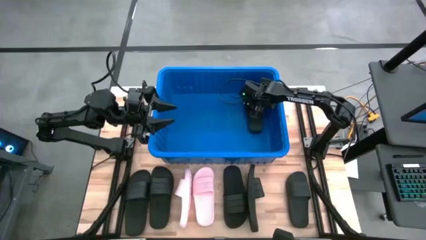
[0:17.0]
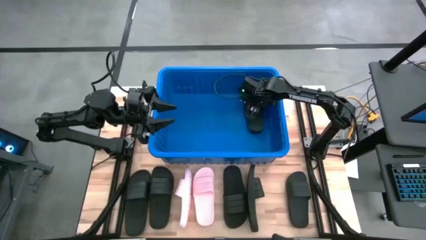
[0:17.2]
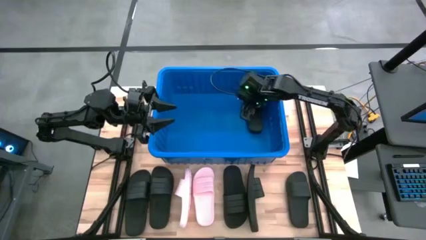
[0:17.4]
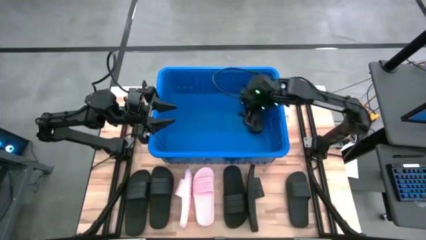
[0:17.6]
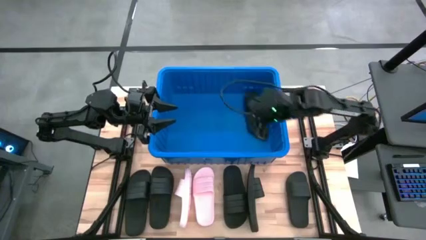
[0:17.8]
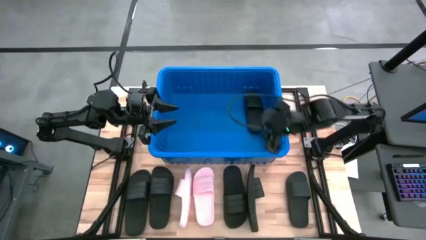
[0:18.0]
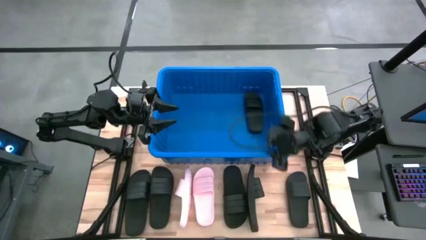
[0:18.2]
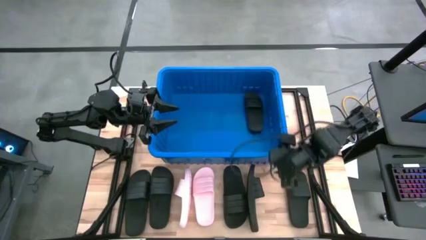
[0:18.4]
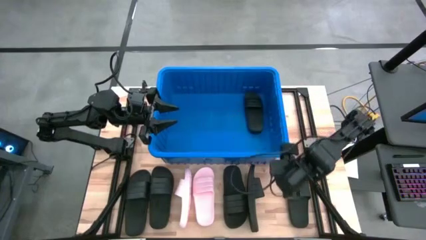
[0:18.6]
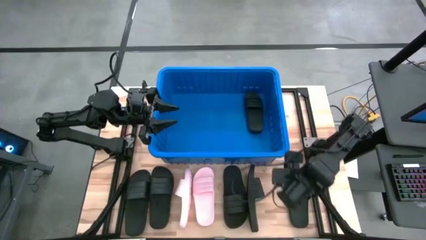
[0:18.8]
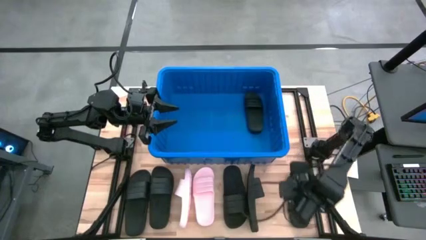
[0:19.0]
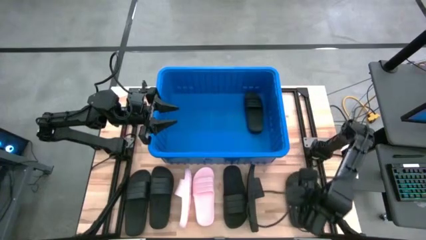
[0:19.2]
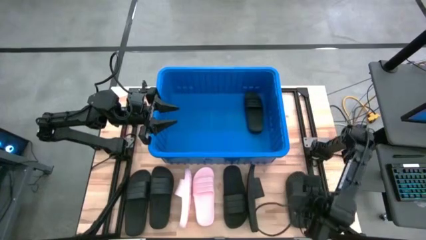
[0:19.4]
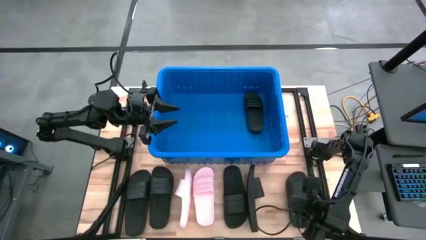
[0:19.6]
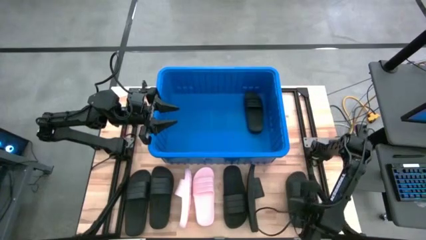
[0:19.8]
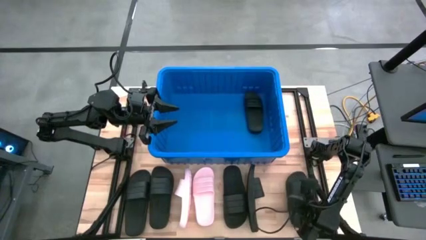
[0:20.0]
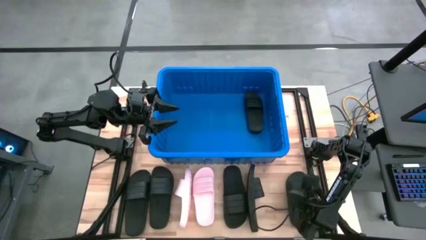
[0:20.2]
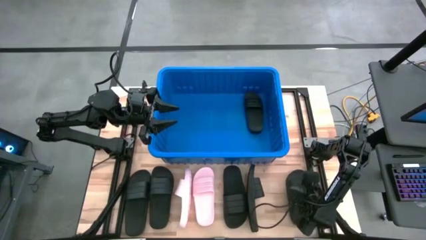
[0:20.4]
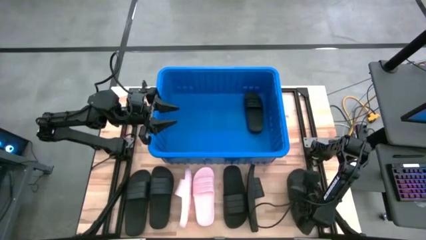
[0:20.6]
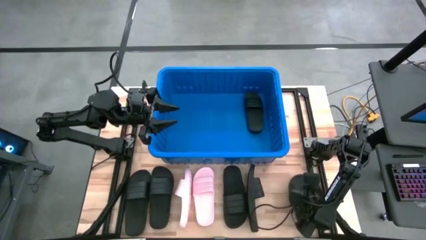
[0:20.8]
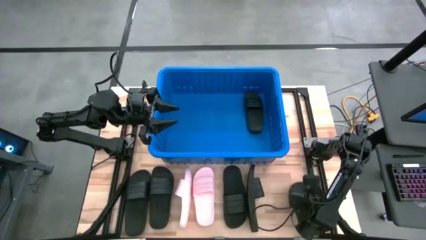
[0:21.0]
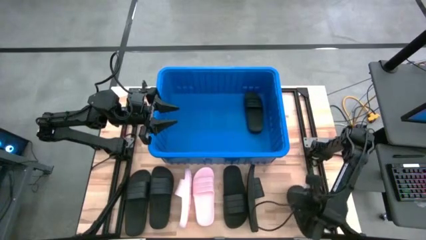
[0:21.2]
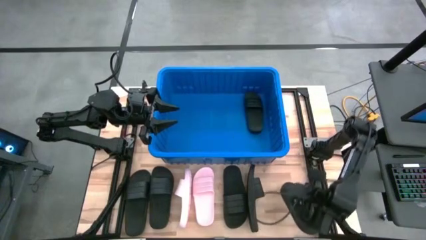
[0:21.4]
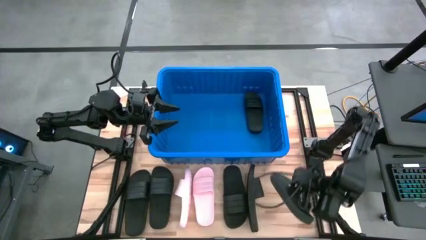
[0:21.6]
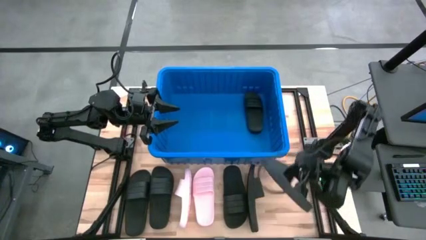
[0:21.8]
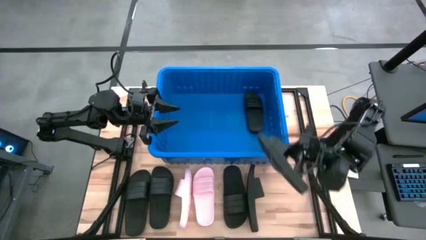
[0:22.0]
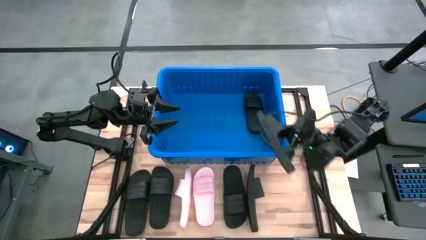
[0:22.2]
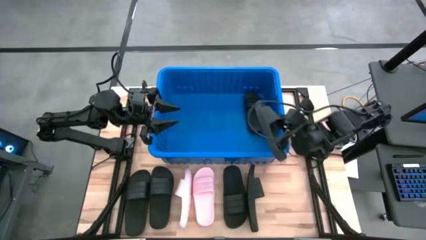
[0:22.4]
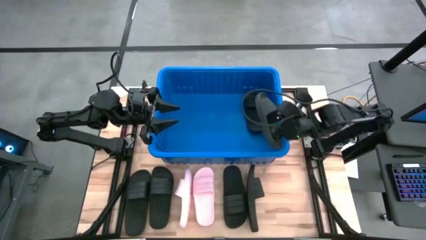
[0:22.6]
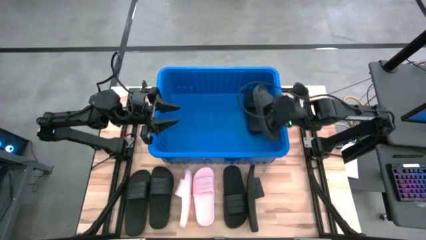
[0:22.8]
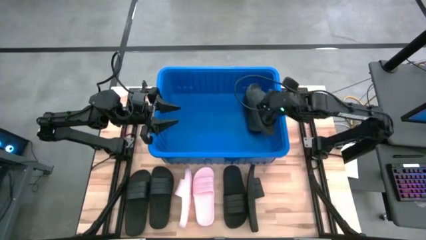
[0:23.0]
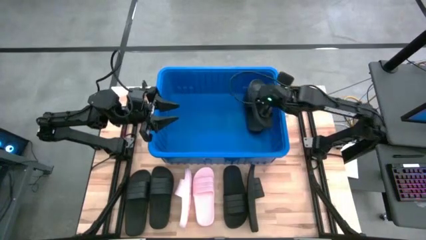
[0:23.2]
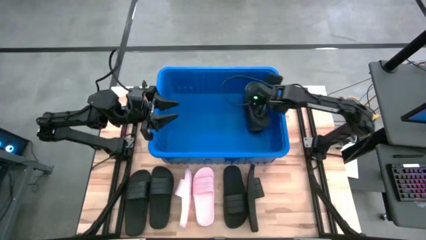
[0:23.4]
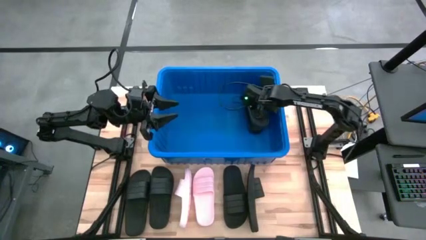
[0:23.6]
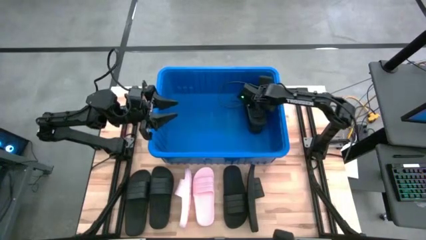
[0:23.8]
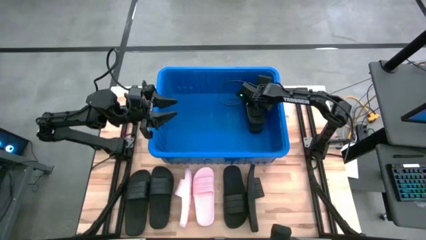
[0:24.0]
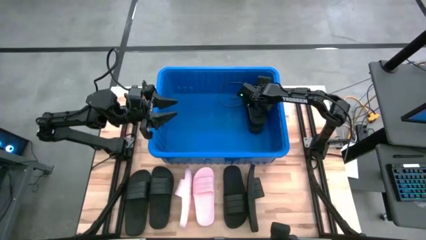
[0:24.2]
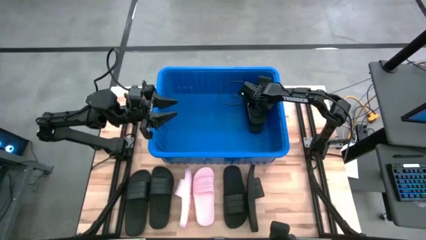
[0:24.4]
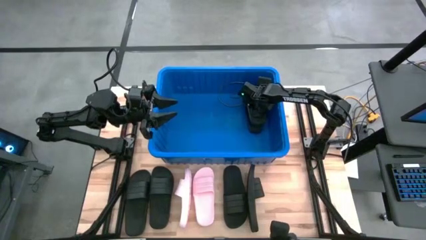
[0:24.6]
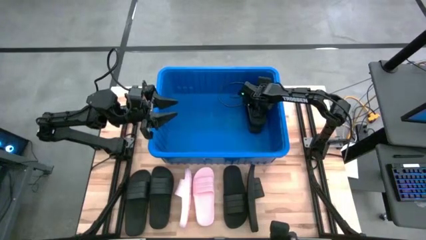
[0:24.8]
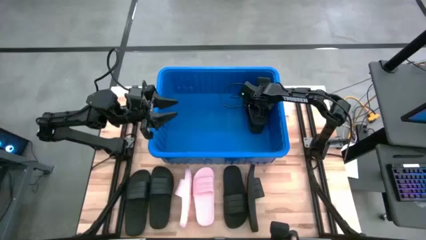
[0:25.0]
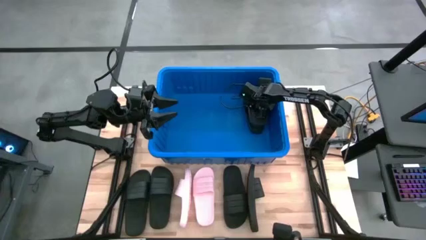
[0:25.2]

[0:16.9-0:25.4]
Task: Pick and place slides into bin
Put the black slide into the bin

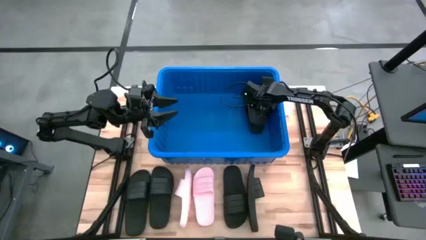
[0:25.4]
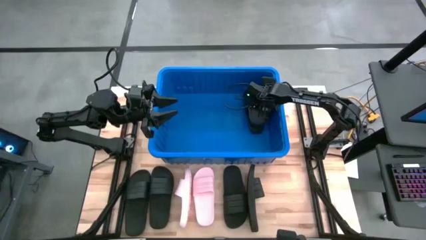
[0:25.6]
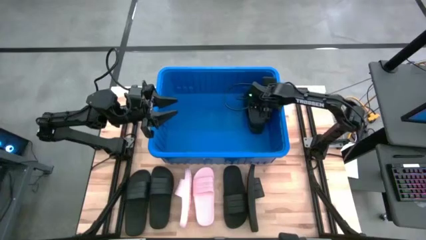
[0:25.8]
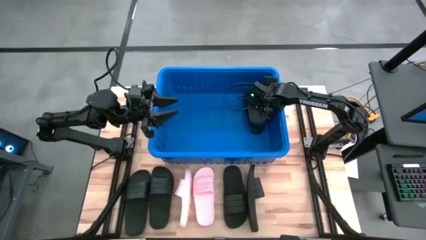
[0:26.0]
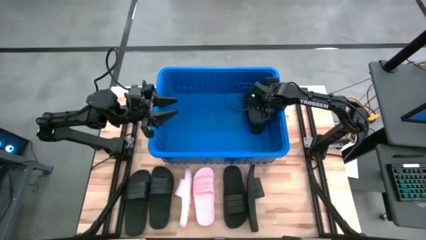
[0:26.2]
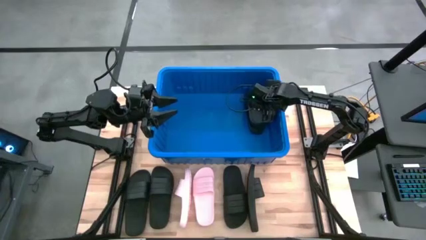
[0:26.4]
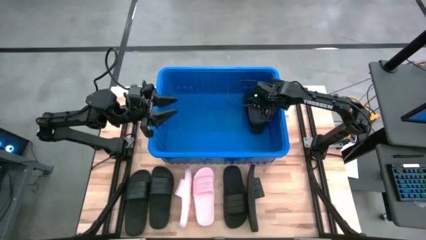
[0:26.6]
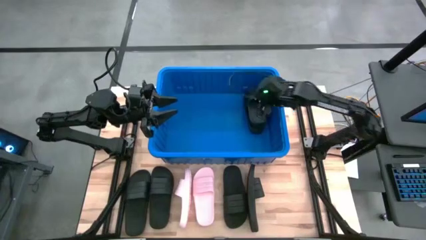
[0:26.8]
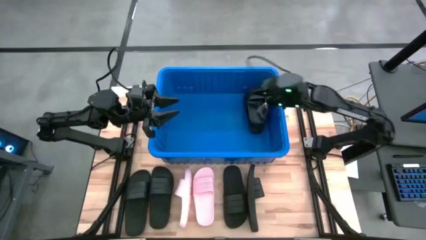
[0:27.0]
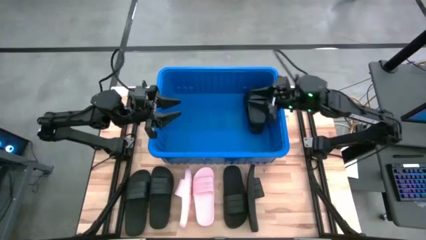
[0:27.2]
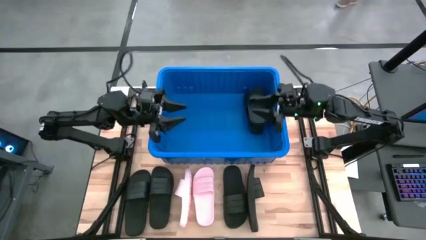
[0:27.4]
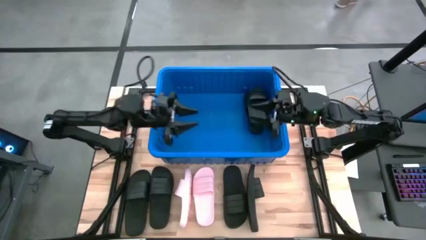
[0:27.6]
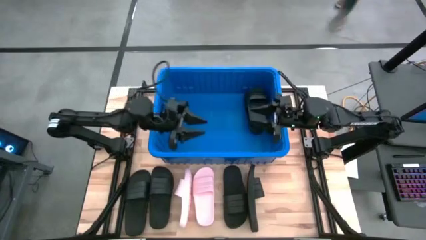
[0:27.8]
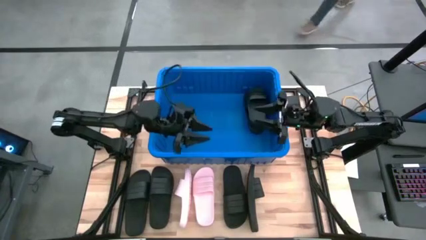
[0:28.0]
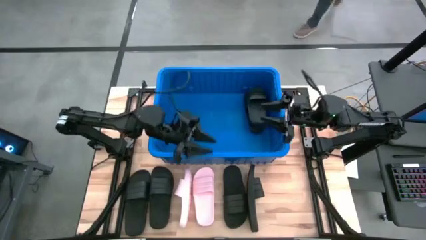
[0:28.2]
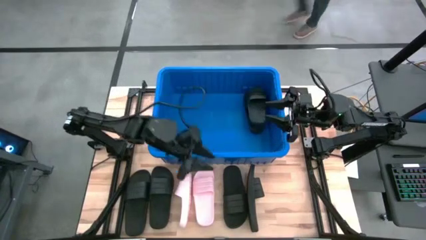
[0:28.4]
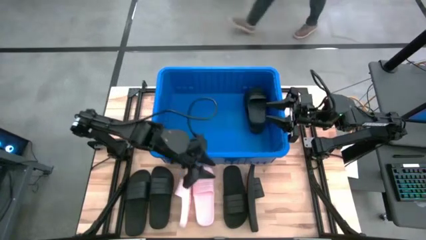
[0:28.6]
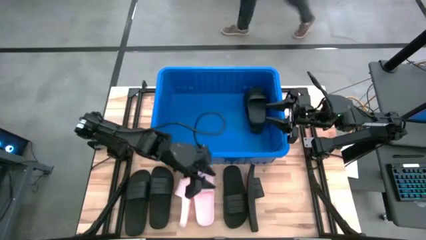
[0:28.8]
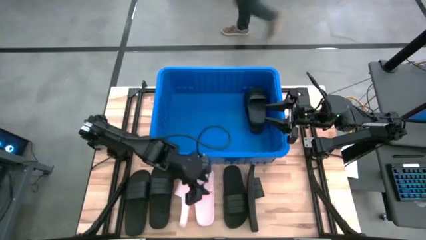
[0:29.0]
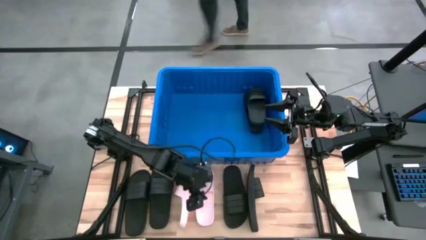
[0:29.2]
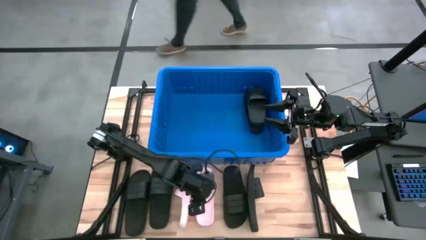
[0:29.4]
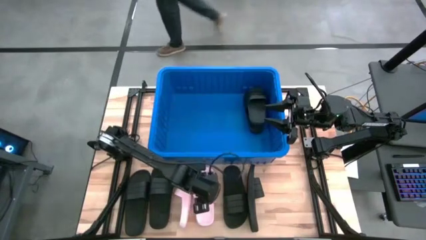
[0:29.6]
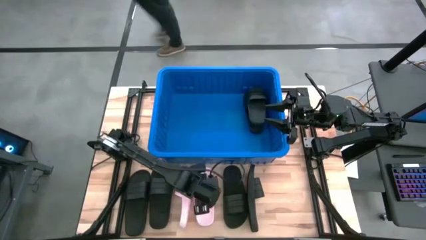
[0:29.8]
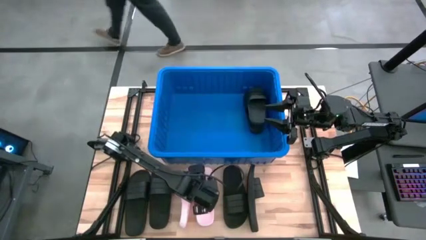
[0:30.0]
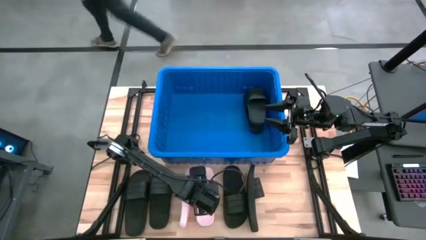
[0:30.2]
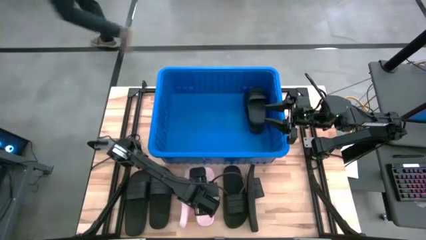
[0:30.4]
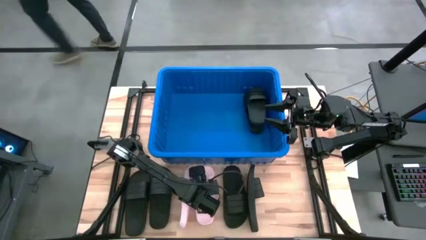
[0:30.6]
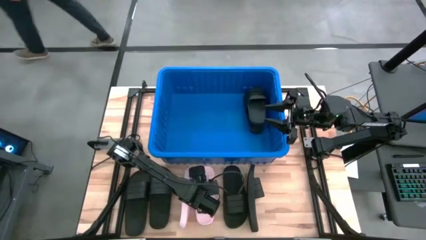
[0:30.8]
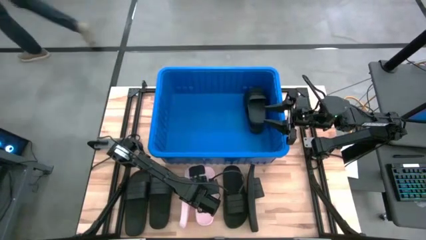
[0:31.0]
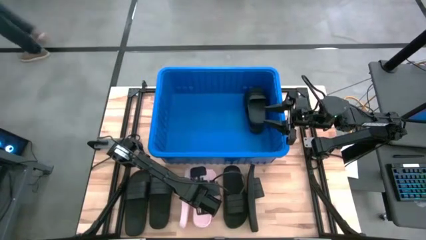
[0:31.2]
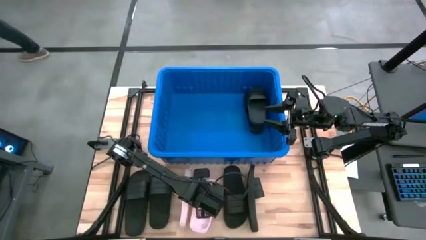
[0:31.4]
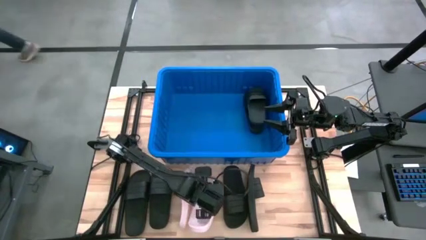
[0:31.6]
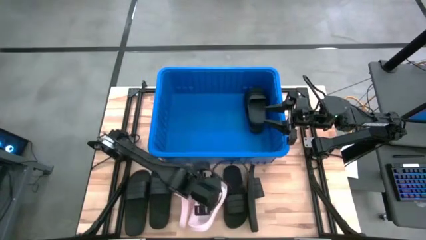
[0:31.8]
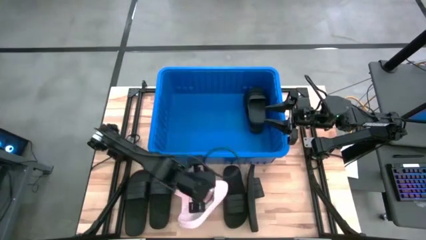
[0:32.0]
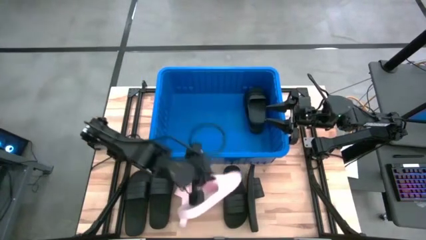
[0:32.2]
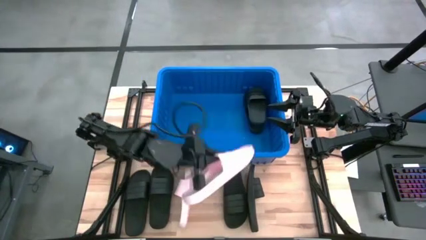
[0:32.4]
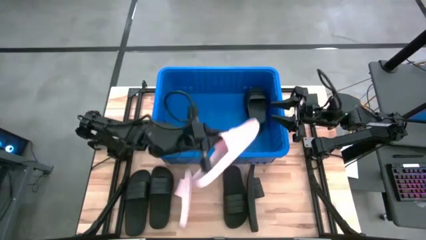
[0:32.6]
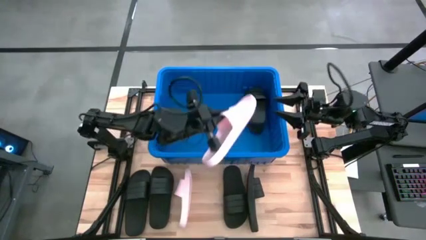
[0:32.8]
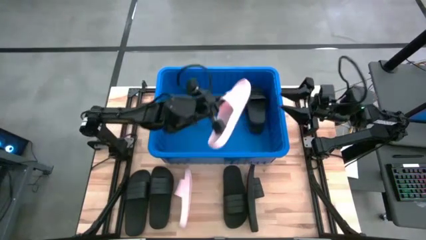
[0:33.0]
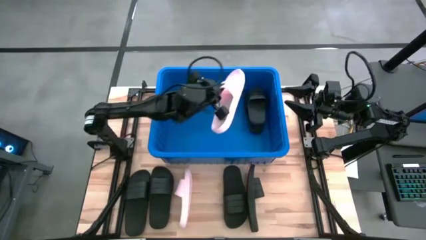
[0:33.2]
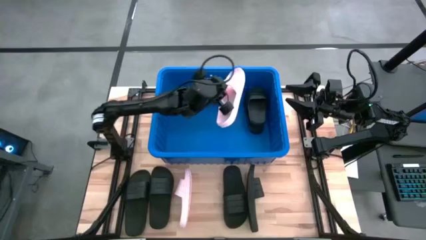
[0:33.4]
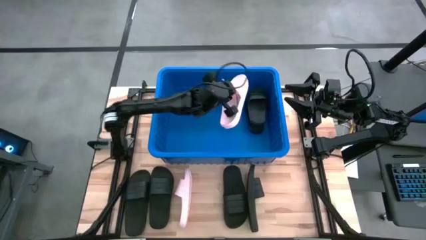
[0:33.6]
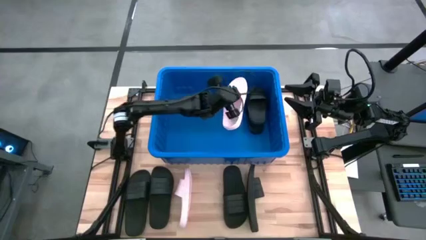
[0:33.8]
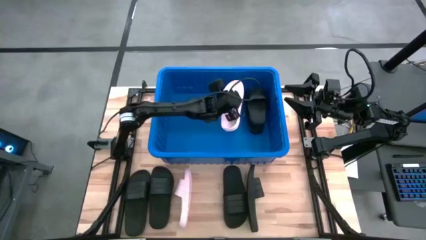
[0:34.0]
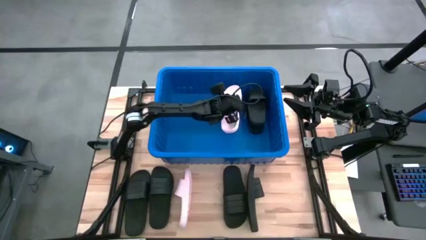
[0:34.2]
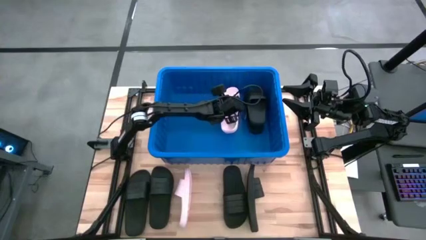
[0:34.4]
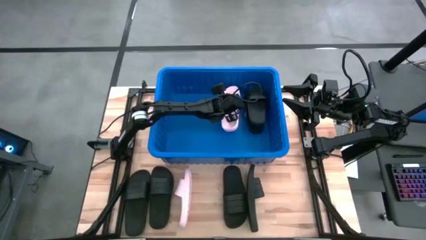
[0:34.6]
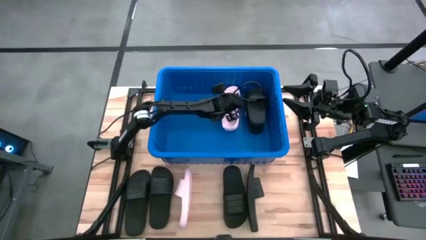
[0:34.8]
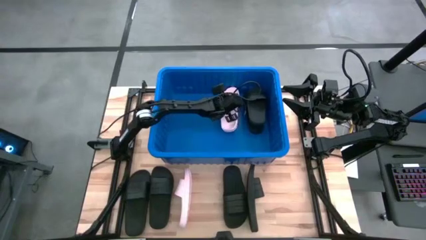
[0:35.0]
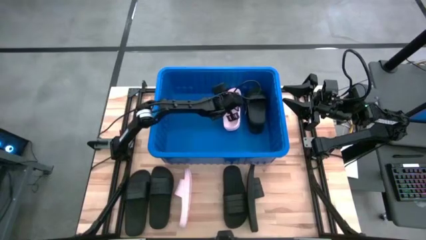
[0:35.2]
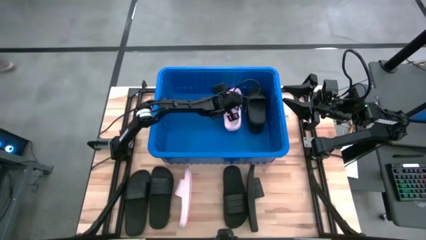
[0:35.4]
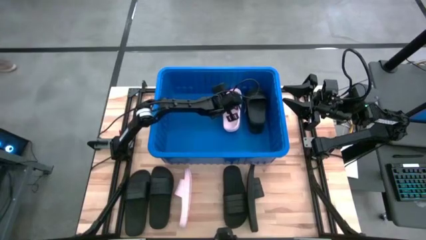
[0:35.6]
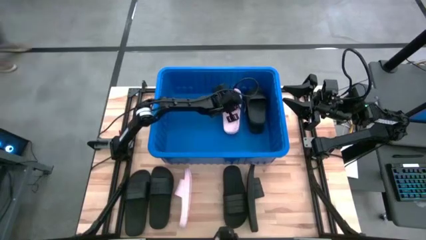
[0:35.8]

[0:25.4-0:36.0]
Put the right pink slide into the bin
